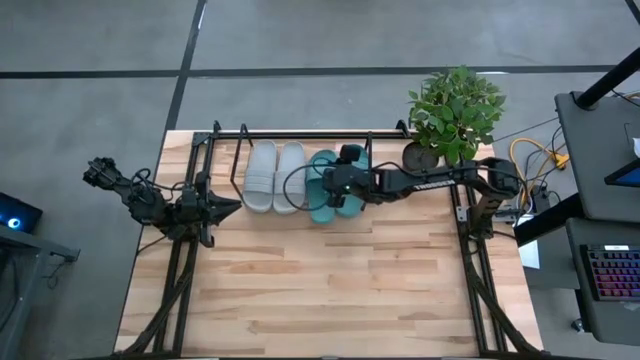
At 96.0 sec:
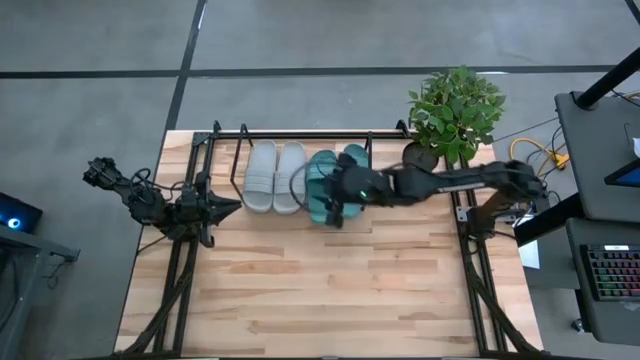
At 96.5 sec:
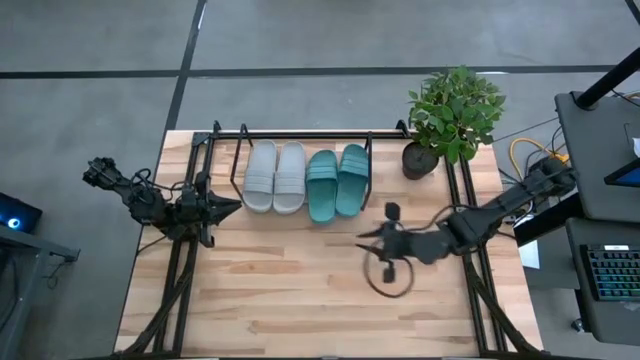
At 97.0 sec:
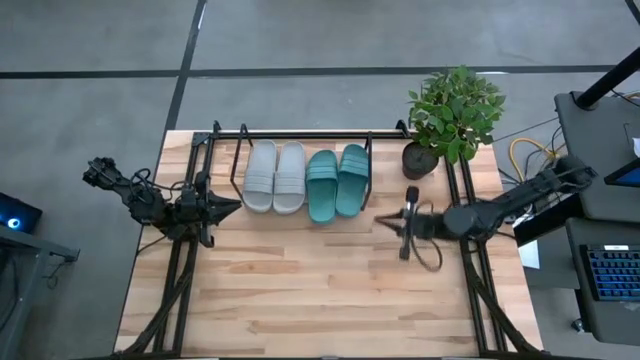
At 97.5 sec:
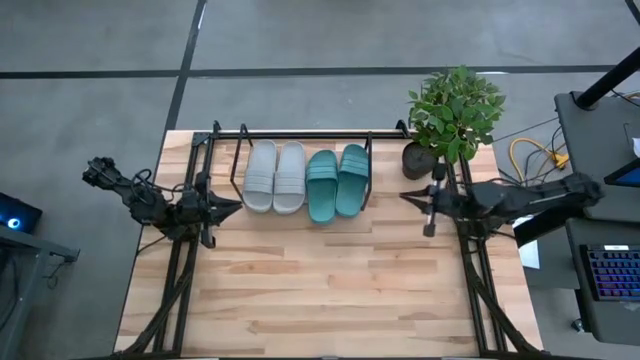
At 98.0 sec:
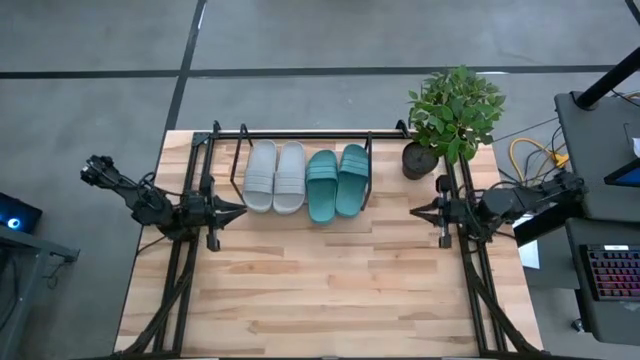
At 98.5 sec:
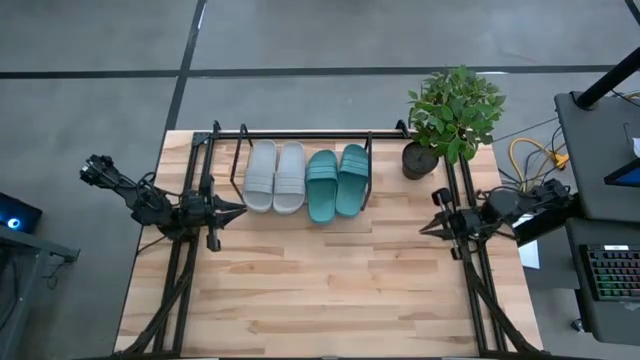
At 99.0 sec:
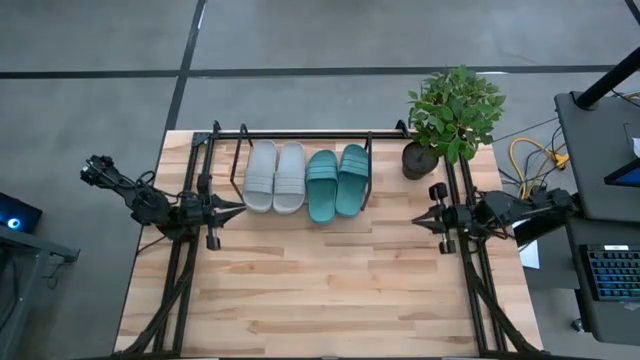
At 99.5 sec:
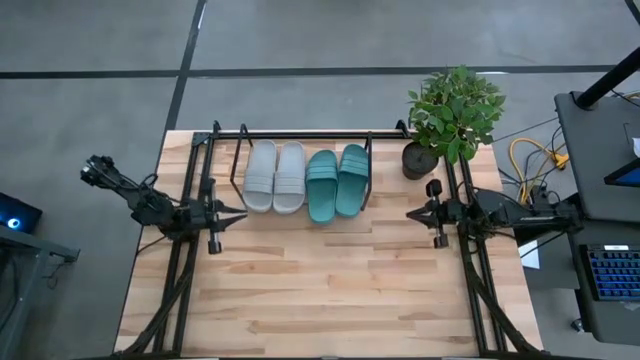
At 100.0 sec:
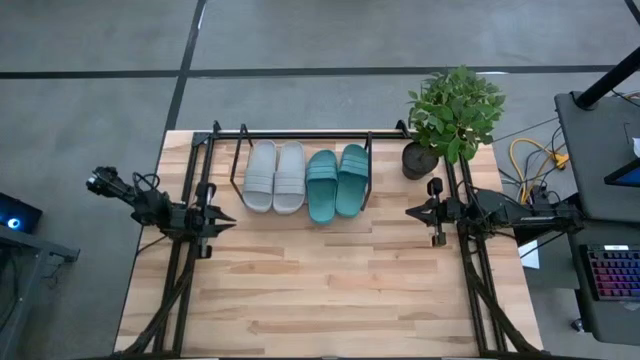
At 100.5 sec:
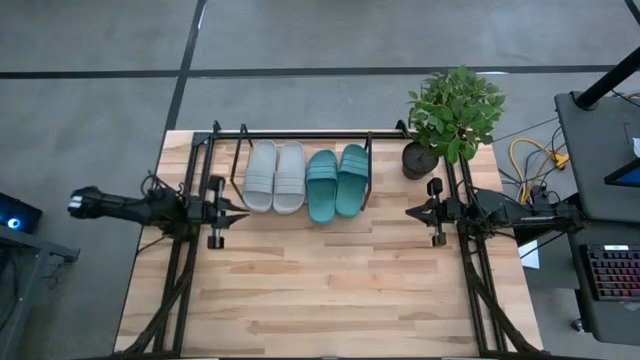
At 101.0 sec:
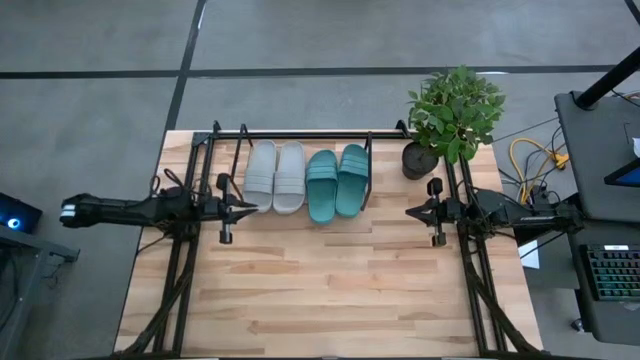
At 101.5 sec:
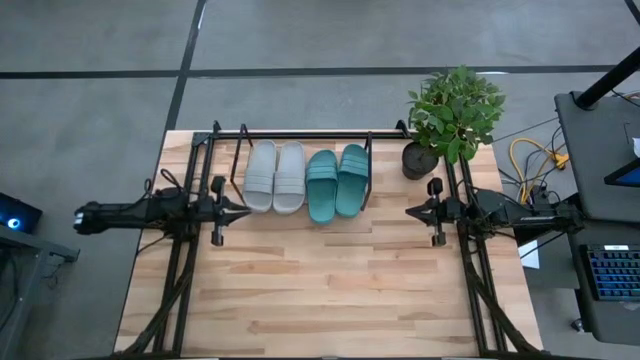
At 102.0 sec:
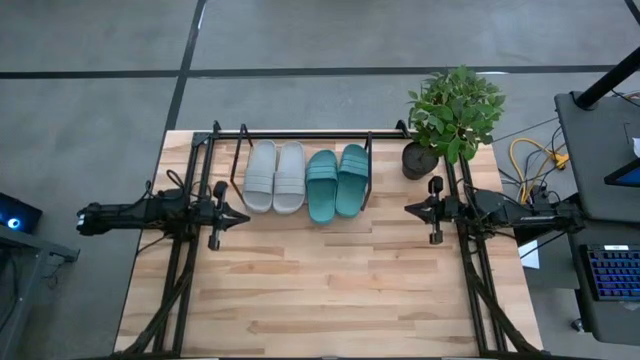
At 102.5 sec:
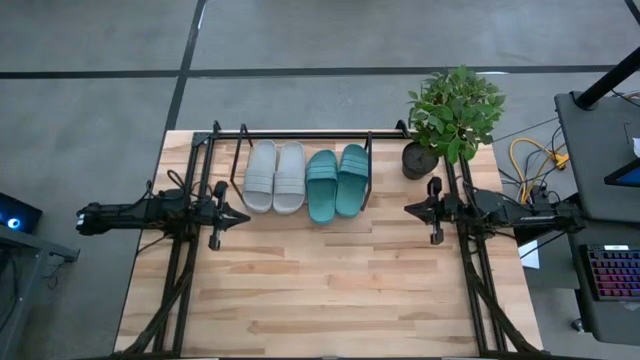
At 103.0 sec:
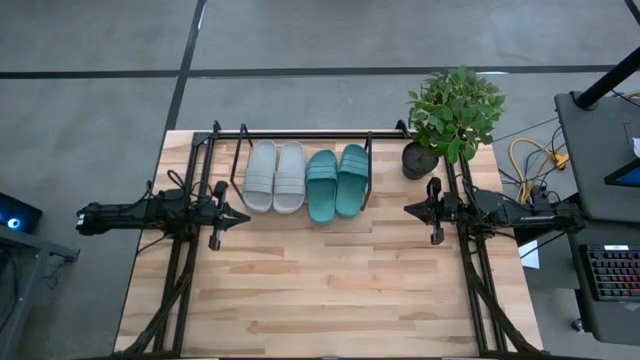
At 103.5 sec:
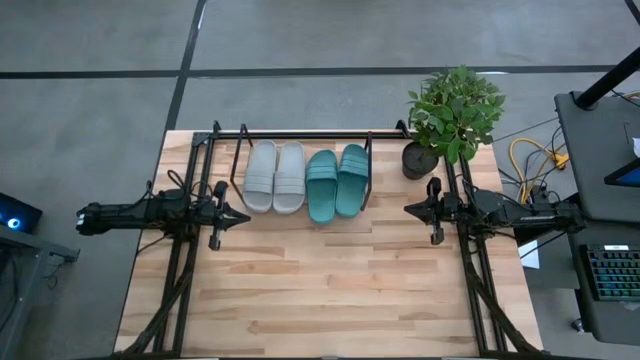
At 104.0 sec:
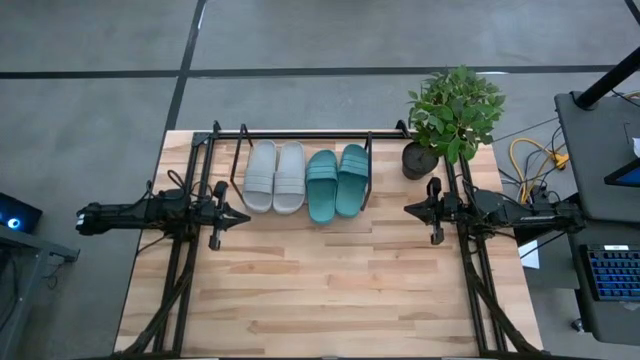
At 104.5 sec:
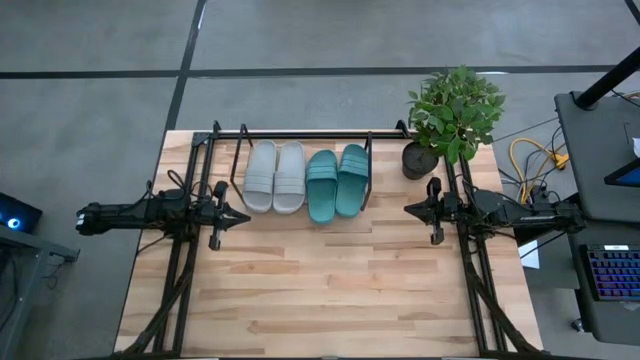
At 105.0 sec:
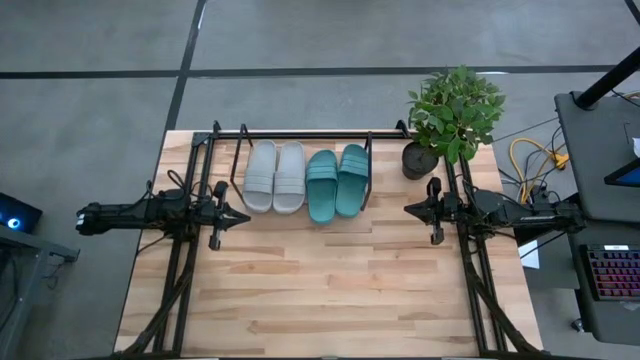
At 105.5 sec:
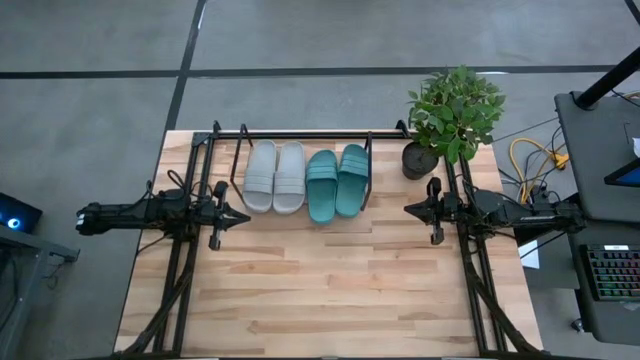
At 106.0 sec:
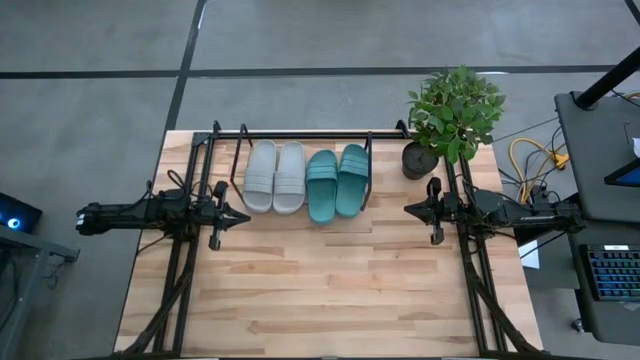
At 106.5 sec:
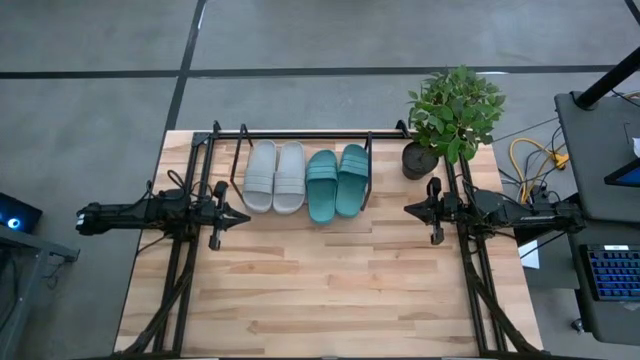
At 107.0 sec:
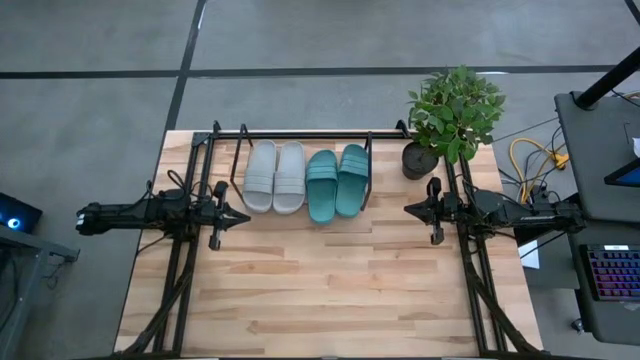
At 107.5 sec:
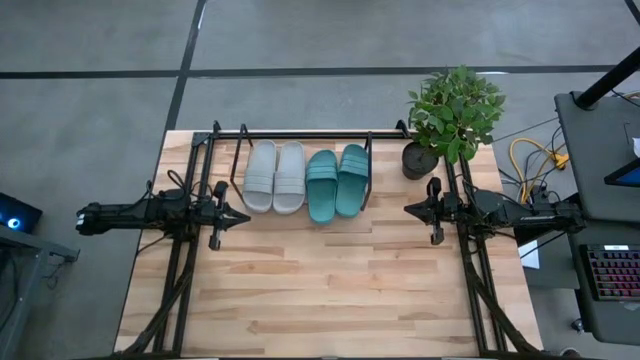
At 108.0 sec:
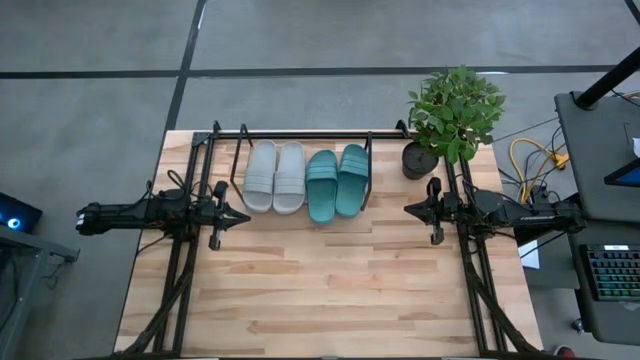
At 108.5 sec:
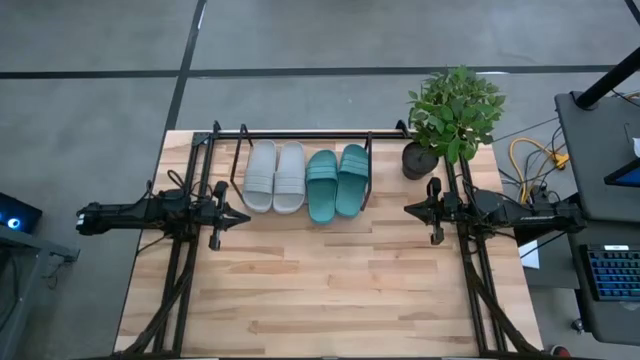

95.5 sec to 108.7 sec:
Task: Pick and place slides into the shelf
Return to Home Position

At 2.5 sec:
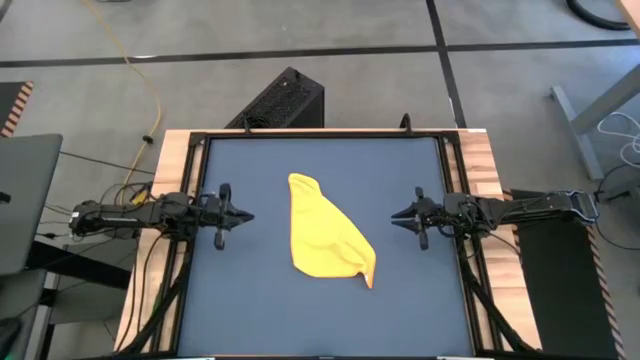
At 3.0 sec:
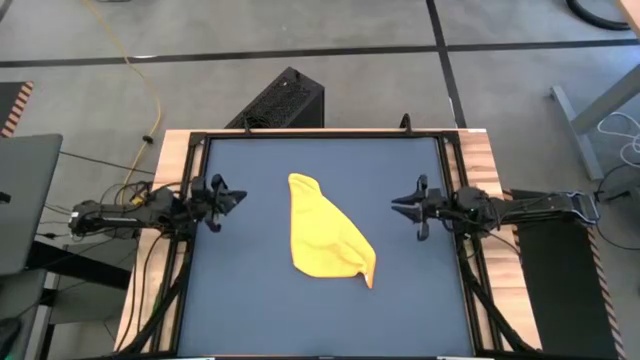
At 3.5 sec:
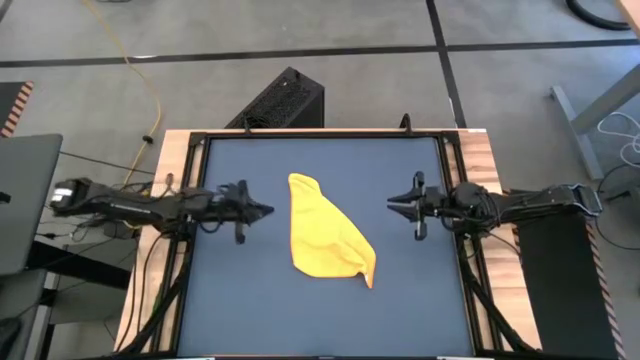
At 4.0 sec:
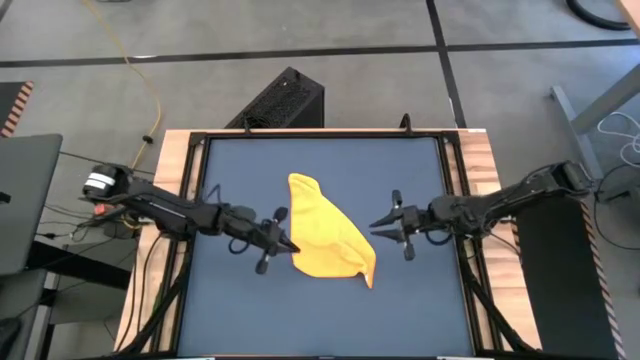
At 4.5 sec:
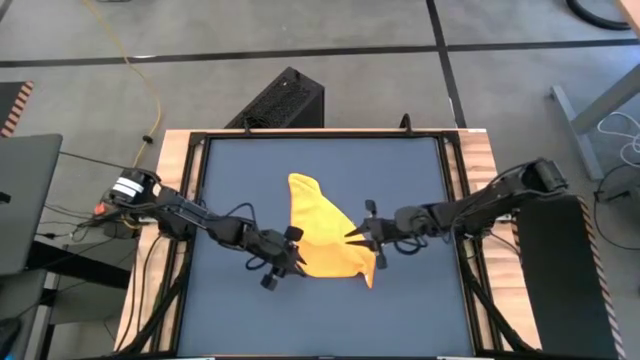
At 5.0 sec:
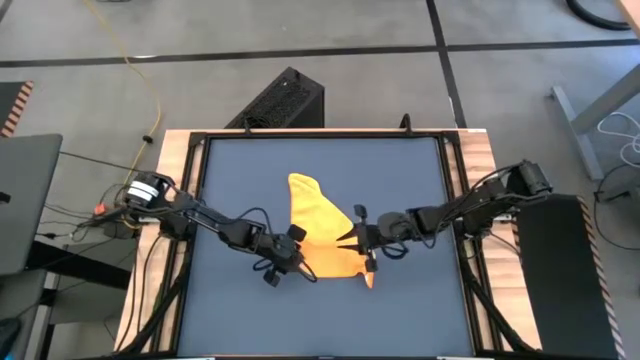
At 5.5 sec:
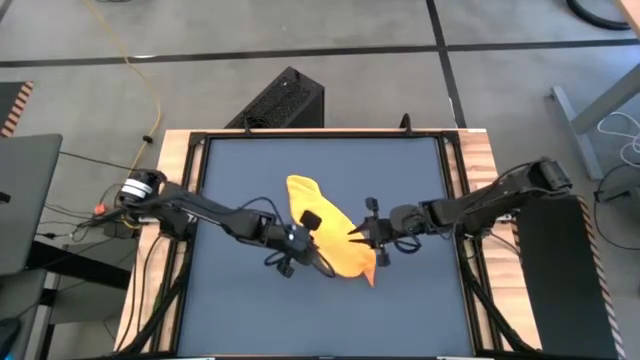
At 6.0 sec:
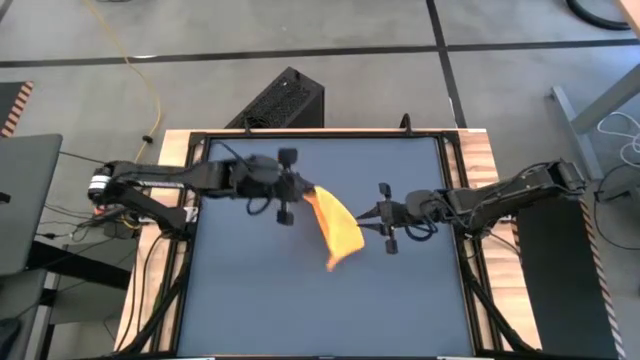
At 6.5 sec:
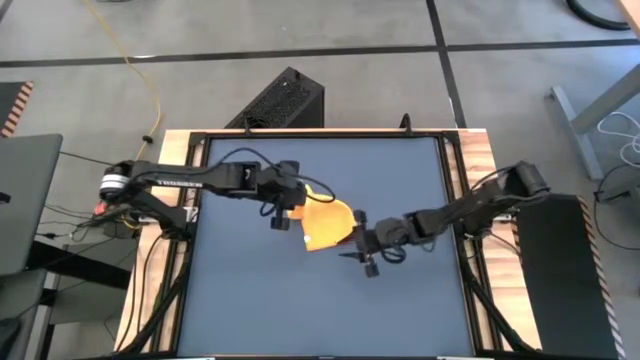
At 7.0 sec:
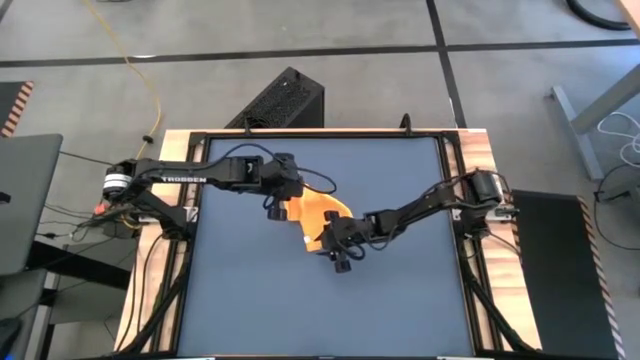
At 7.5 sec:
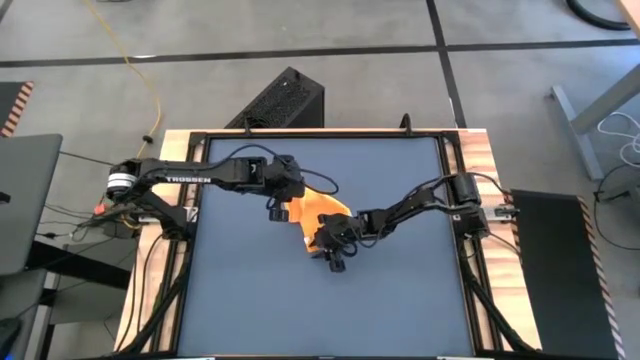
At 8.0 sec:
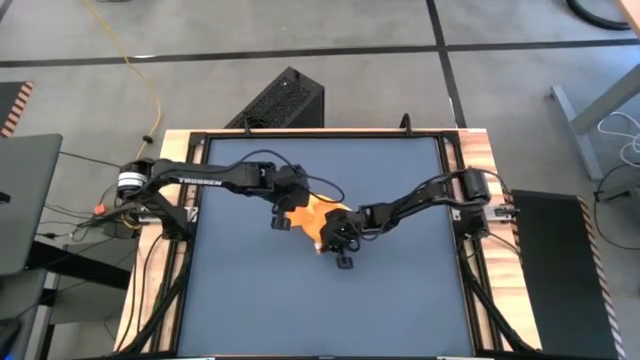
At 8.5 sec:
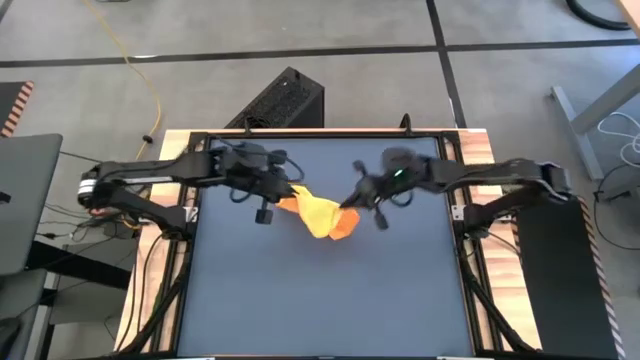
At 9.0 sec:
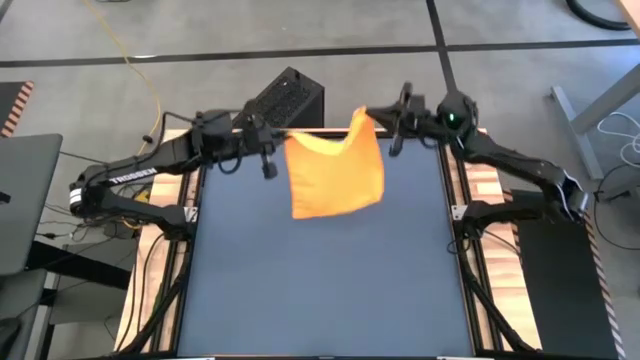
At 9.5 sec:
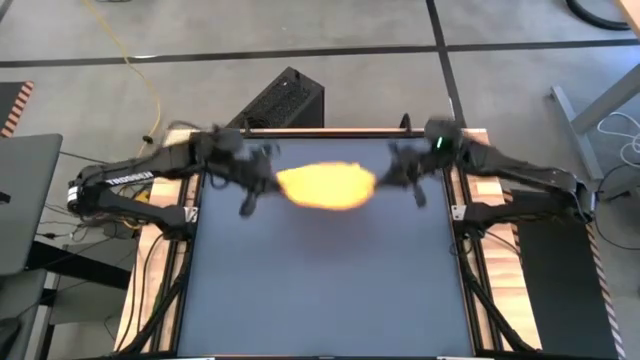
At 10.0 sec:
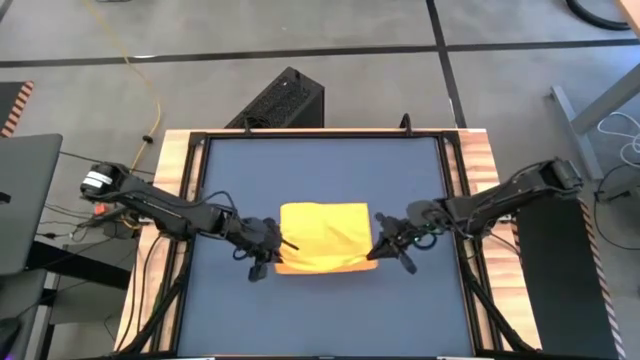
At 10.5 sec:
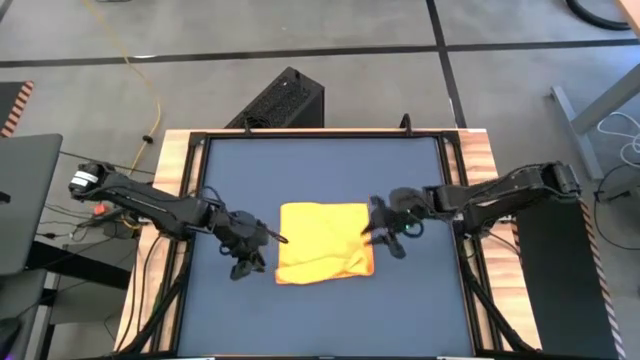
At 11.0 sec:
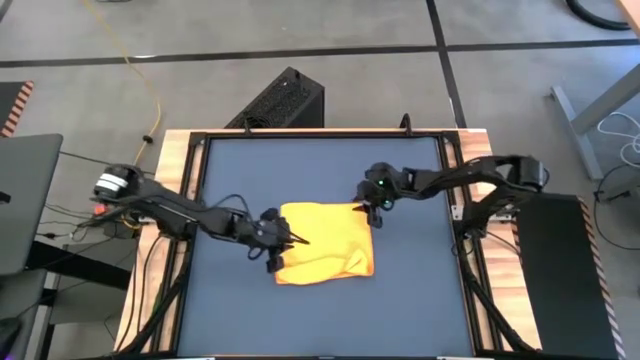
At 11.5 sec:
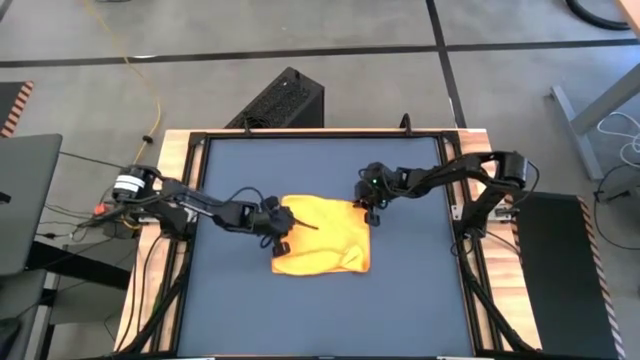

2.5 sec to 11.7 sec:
Task: Roll towel into tight, uniform cylinder
Roll the orange microfiber towel
